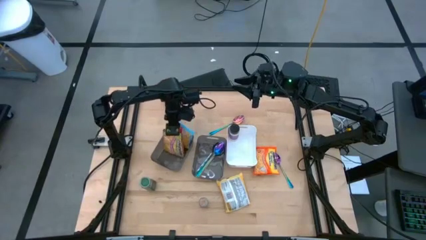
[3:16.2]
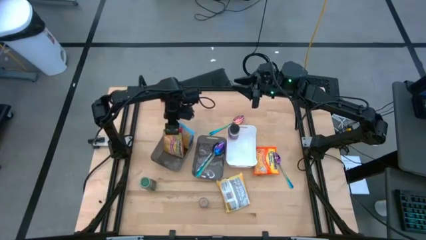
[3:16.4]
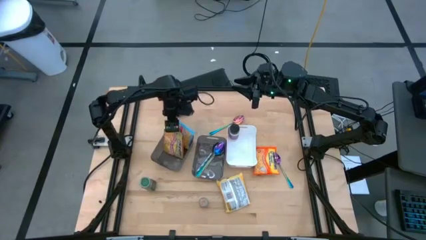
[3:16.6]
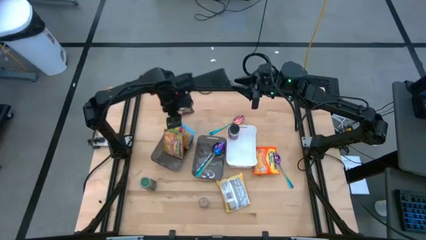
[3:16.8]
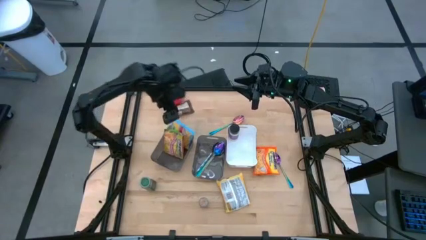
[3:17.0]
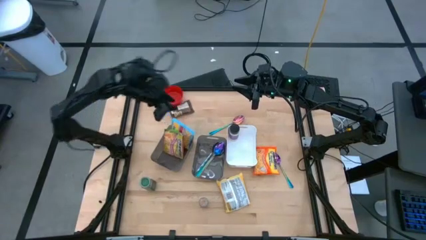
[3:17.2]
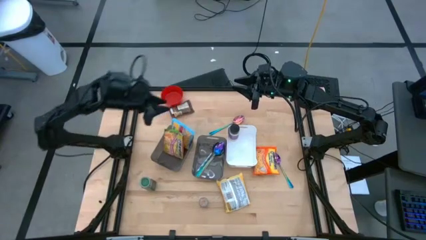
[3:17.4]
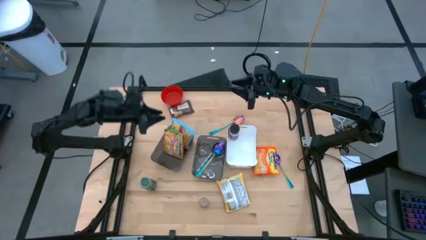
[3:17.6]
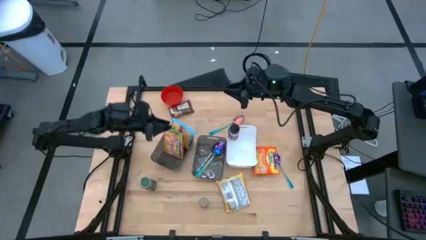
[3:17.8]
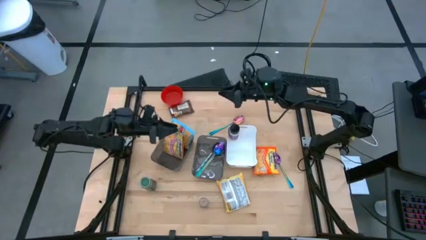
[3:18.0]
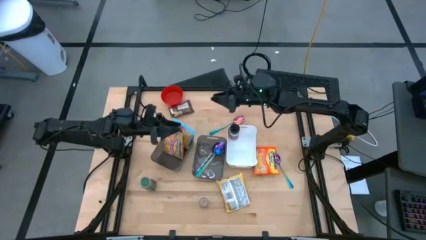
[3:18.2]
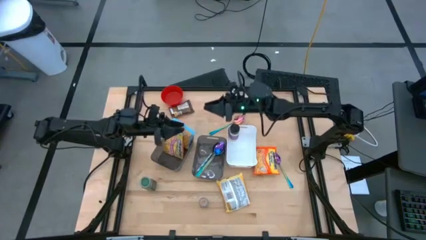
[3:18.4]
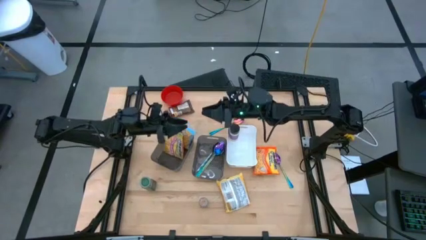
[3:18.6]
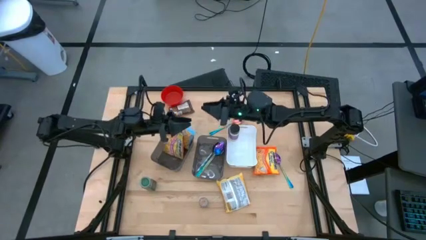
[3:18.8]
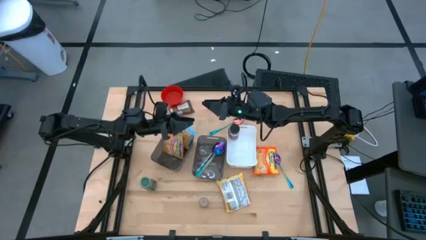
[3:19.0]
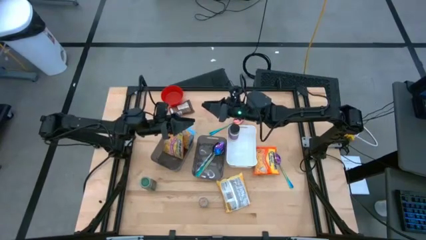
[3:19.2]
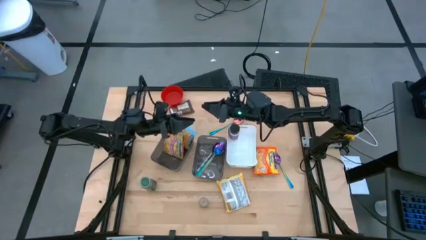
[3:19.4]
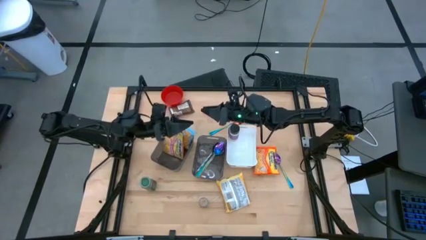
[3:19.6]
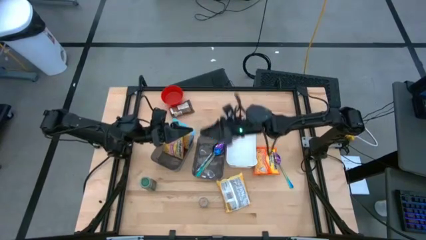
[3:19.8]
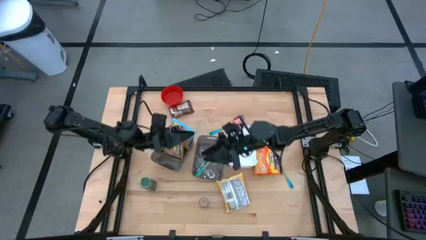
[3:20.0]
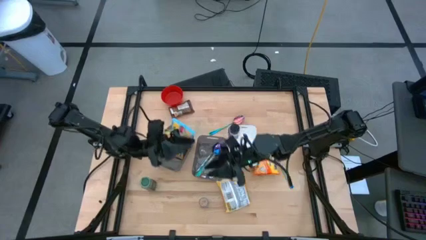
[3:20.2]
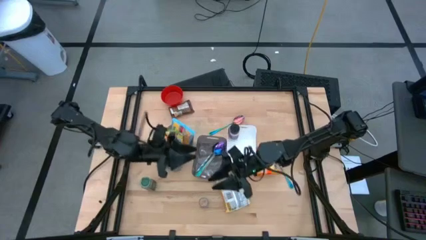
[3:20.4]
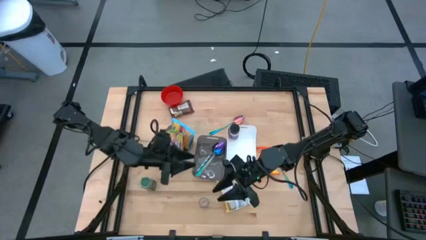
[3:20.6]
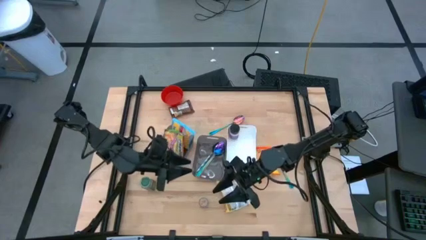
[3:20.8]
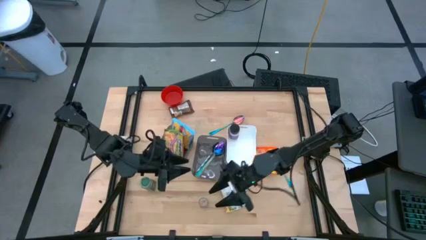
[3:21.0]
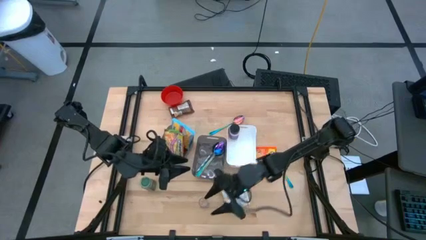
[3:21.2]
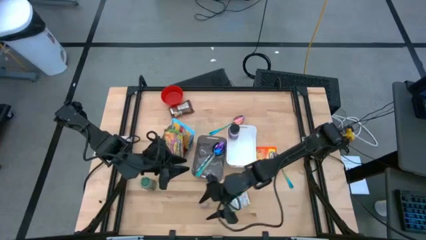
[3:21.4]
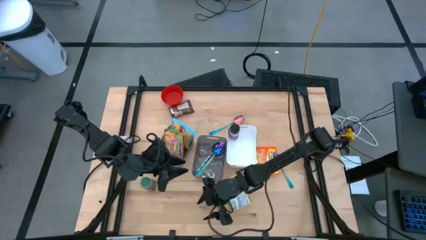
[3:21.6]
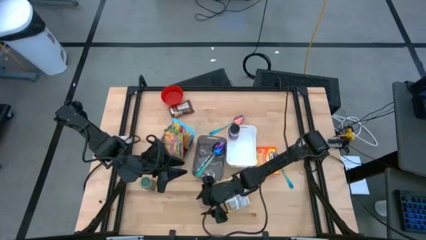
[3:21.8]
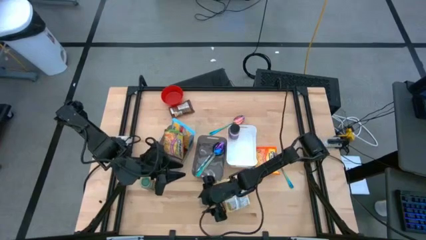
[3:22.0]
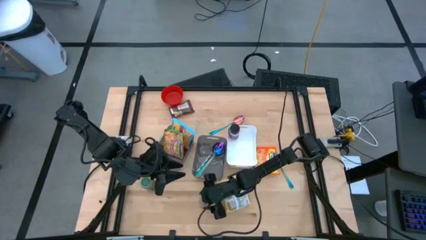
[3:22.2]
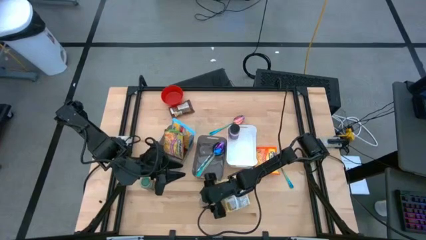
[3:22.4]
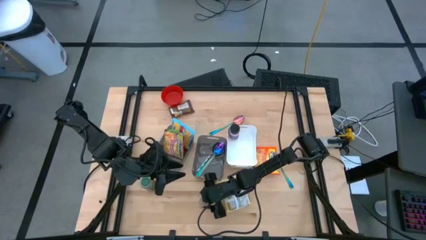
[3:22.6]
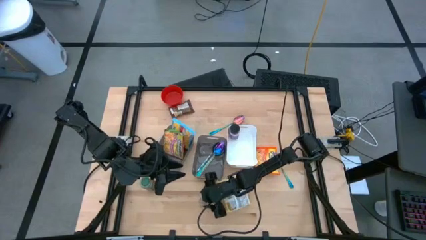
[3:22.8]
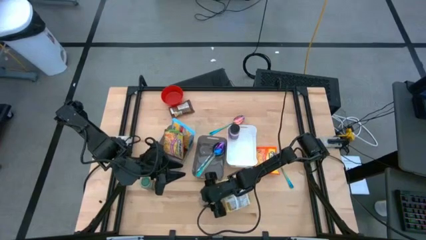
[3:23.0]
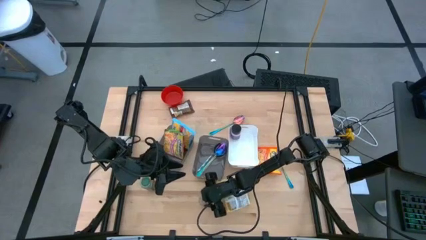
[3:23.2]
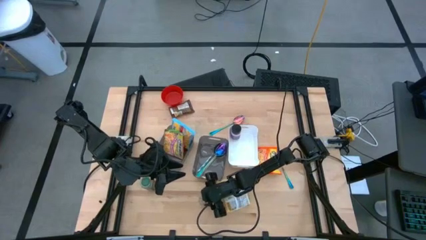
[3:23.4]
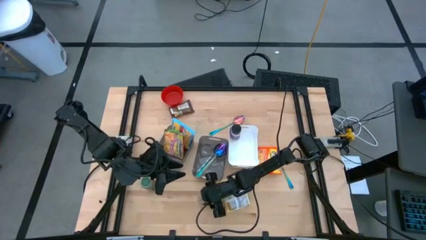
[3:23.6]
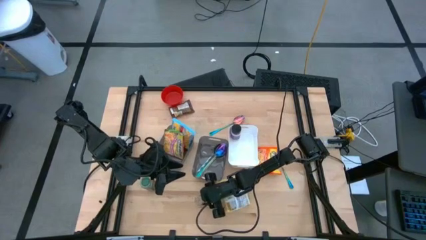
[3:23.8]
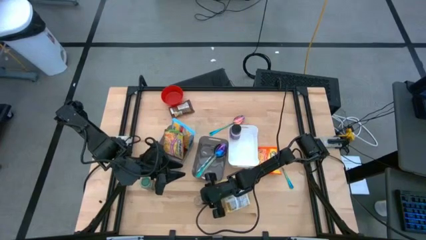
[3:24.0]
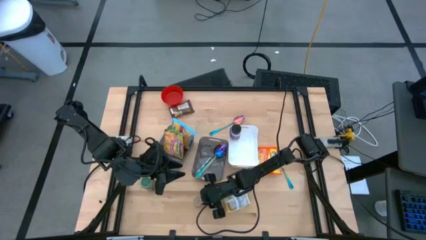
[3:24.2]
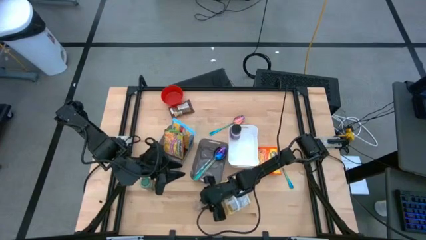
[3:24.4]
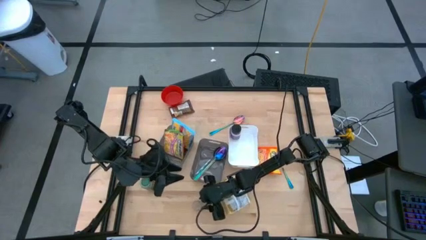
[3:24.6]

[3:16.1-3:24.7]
Task: Pick & Place Food Item
Put the brown bottle into the white bin

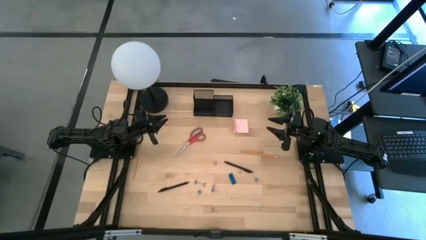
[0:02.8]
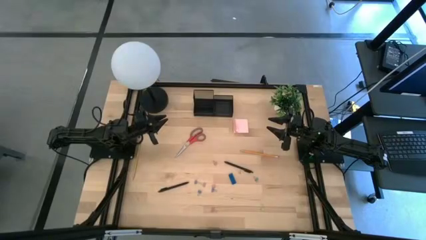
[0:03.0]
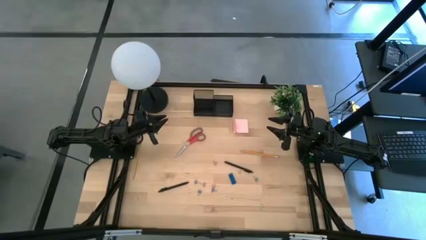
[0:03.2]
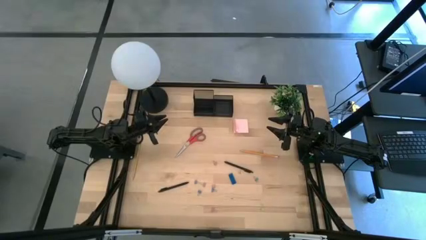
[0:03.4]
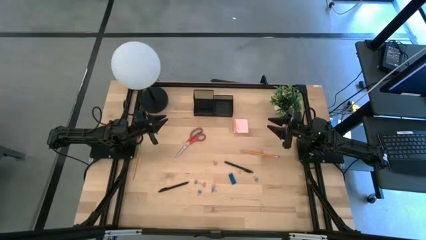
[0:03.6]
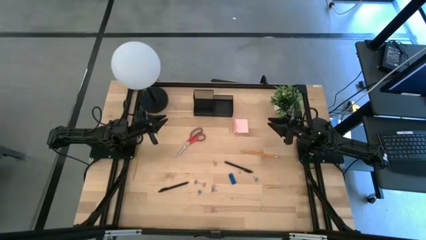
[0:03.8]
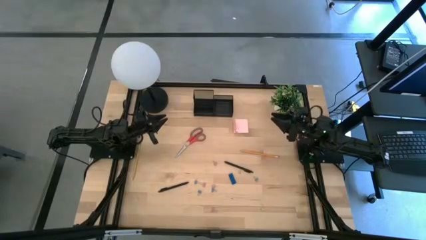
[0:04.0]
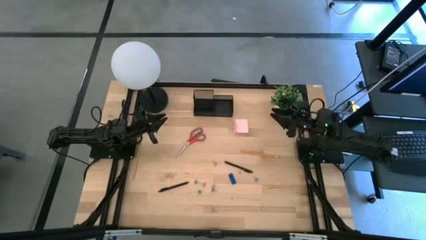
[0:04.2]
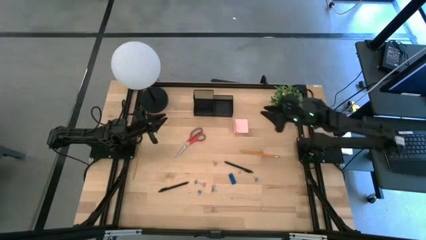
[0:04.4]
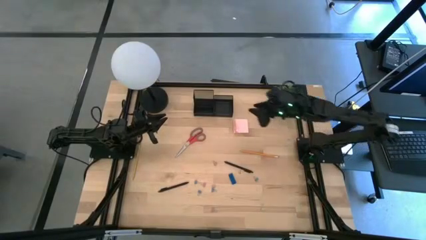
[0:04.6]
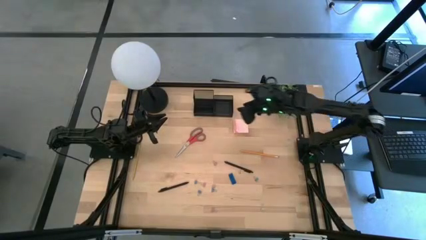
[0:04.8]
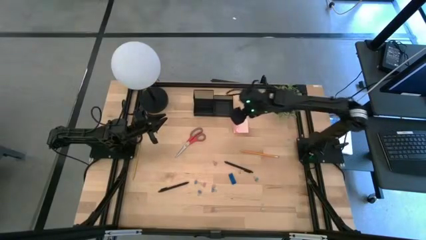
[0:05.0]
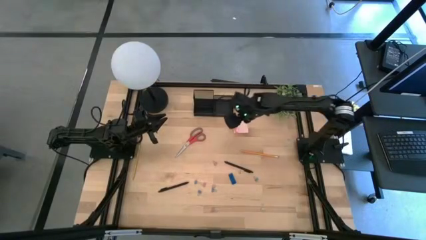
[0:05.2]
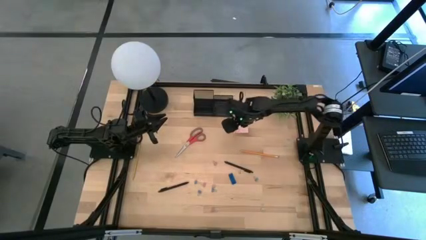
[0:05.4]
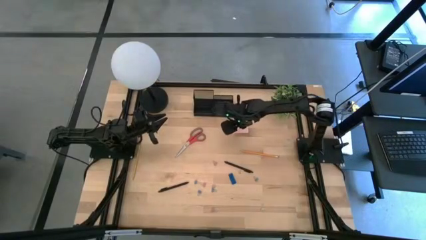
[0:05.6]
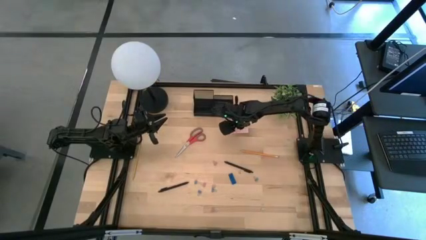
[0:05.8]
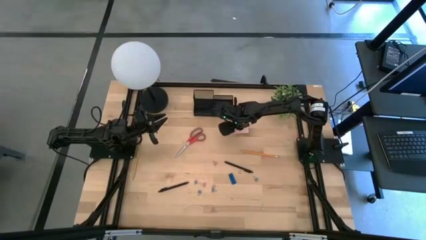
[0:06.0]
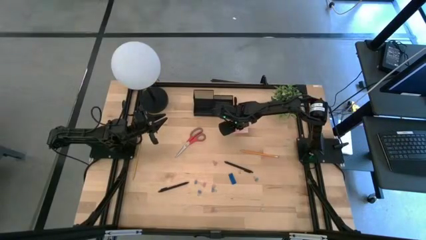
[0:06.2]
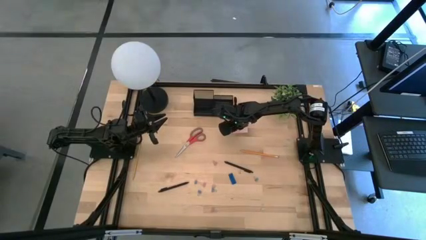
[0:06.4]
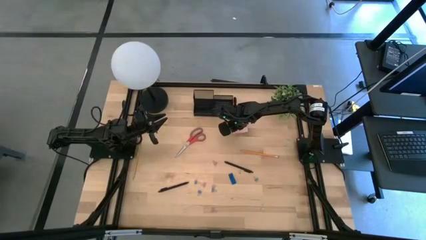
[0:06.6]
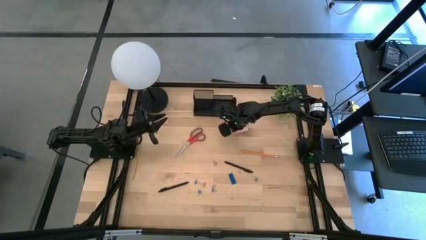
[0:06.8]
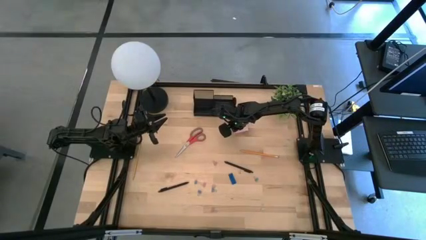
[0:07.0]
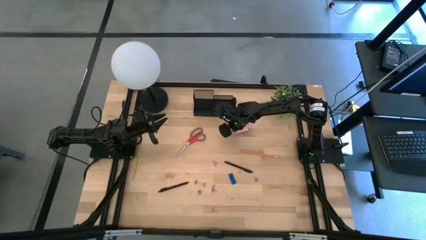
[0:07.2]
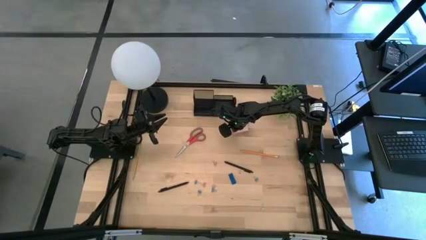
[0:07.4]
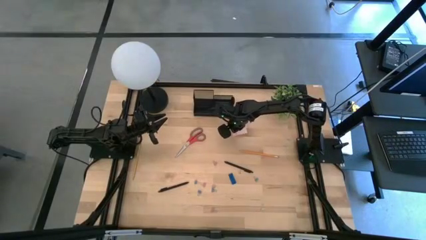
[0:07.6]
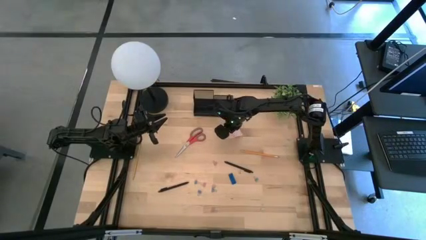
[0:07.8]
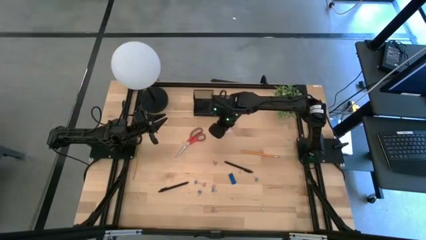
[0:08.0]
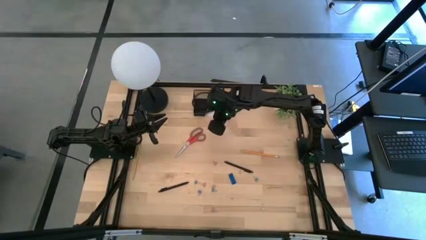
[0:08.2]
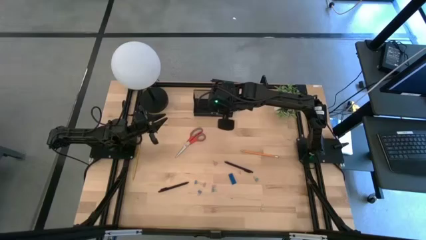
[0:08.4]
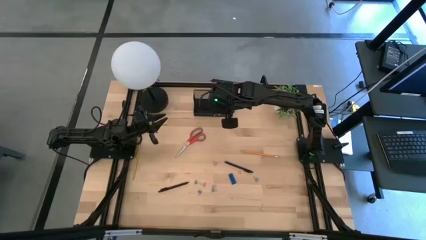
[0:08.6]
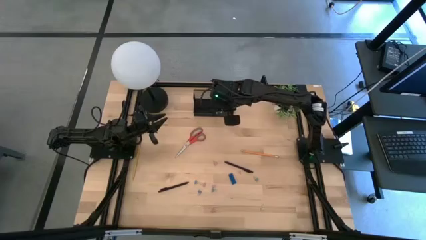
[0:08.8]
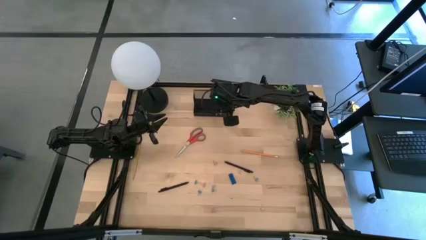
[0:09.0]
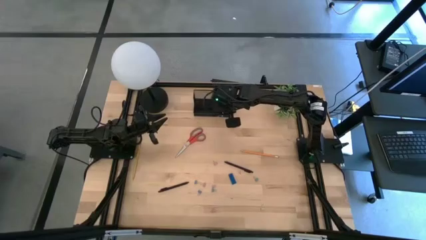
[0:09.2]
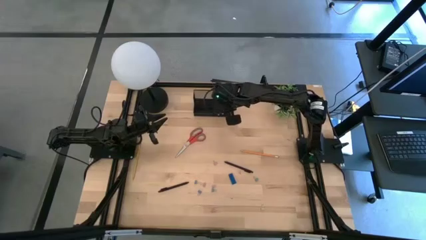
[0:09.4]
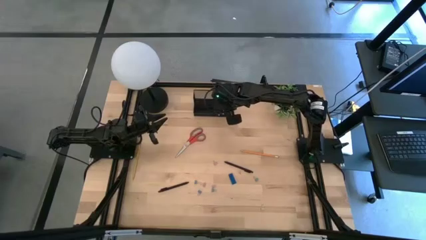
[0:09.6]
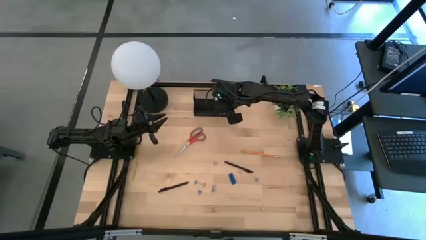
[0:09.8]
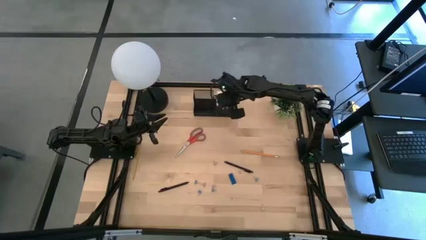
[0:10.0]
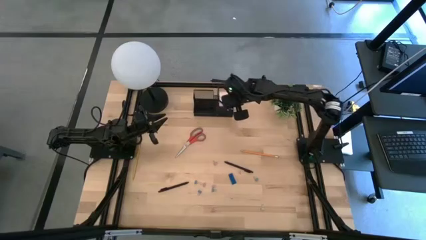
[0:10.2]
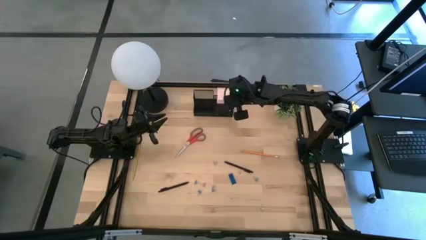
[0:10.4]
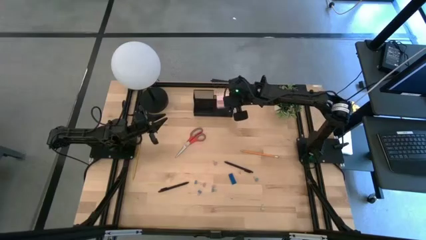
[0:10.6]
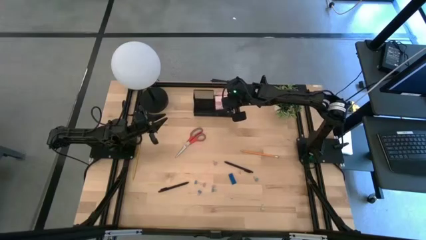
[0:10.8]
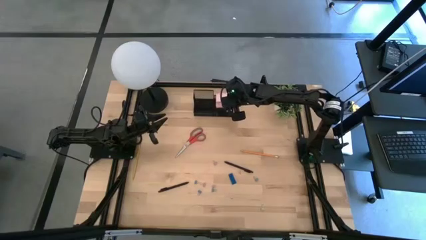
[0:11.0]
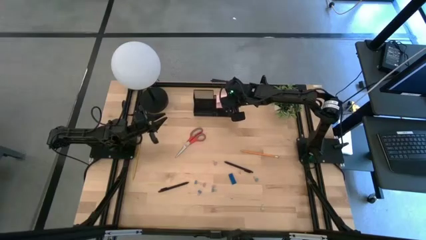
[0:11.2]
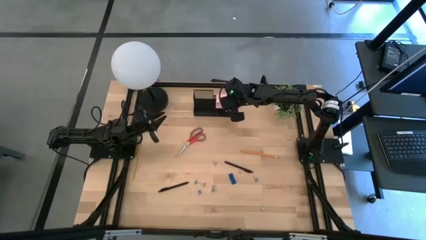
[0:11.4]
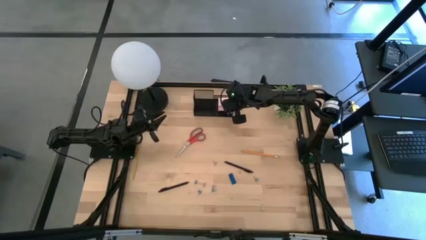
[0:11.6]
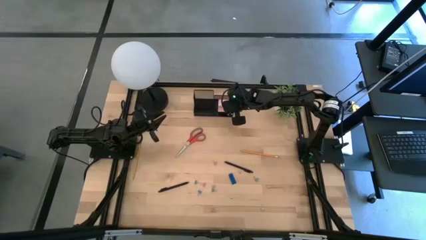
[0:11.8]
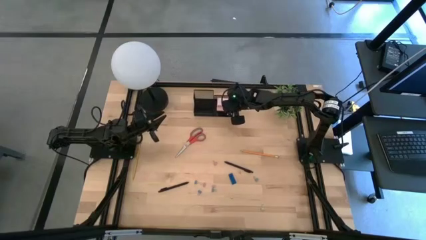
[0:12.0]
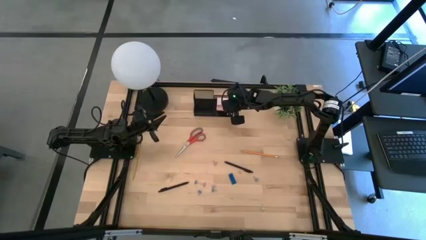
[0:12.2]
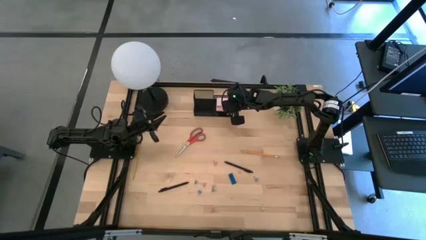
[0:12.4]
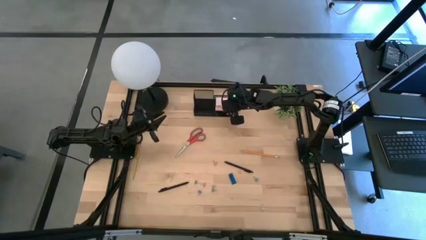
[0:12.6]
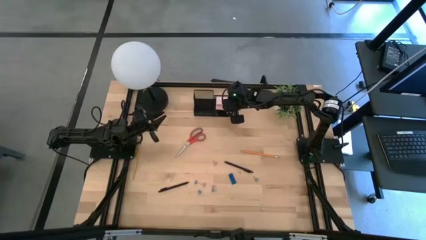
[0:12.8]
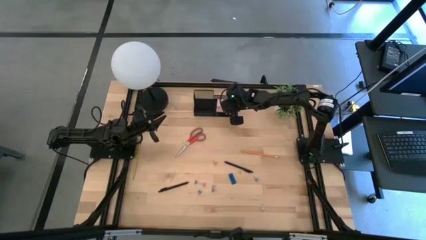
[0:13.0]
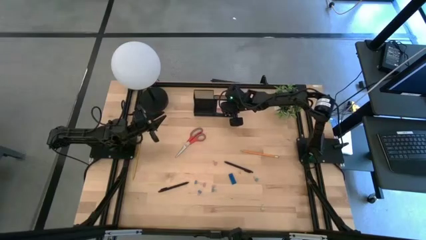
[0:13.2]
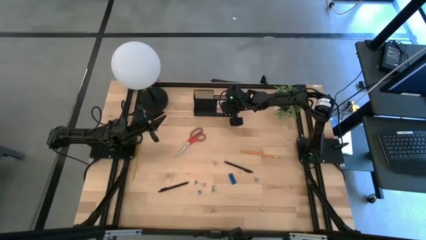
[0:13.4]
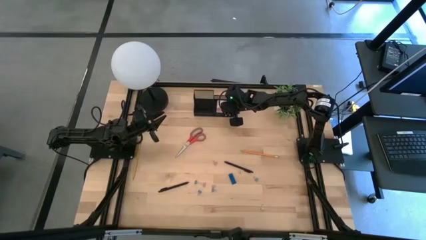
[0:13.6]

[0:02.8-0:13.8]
Task: Pick and place office supplies into organizer
Put the pink sticky notes into the black desk organizer
